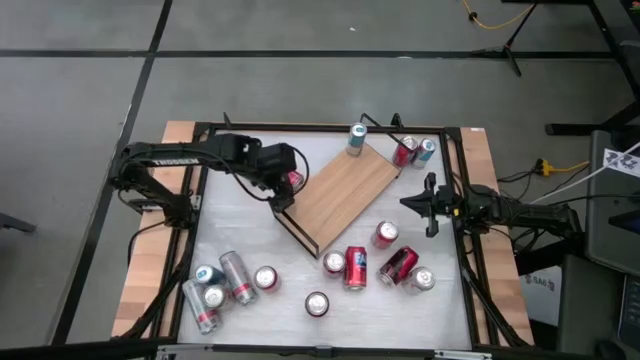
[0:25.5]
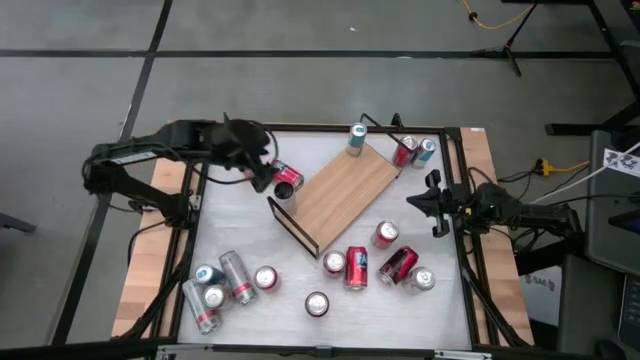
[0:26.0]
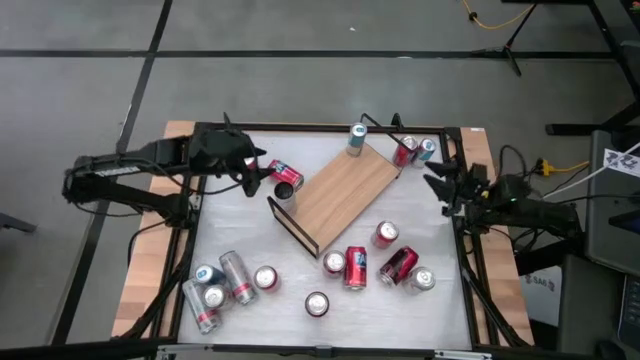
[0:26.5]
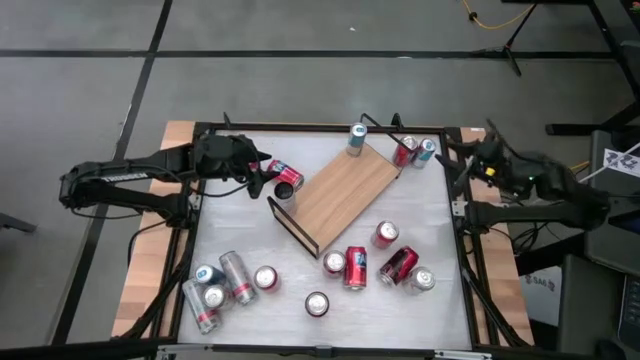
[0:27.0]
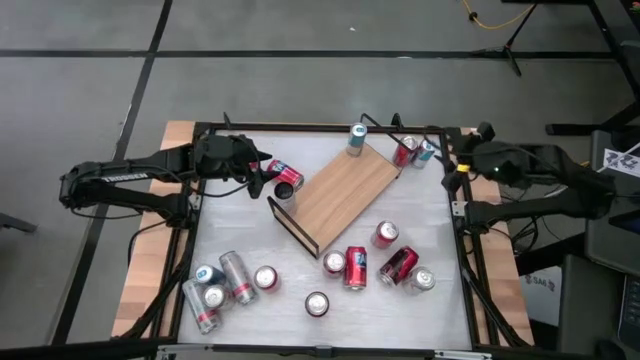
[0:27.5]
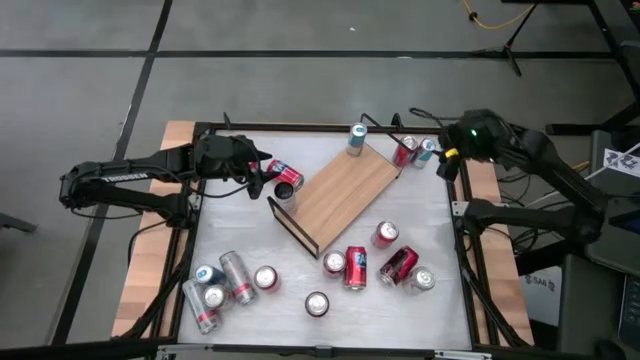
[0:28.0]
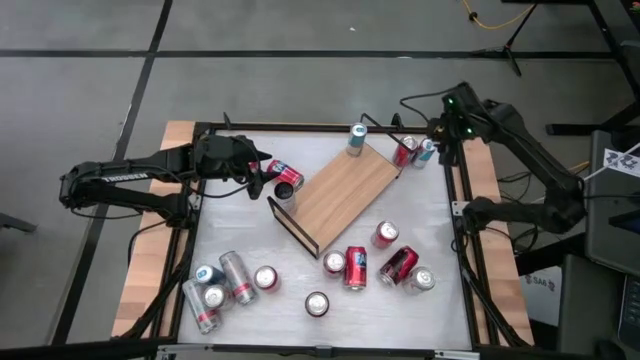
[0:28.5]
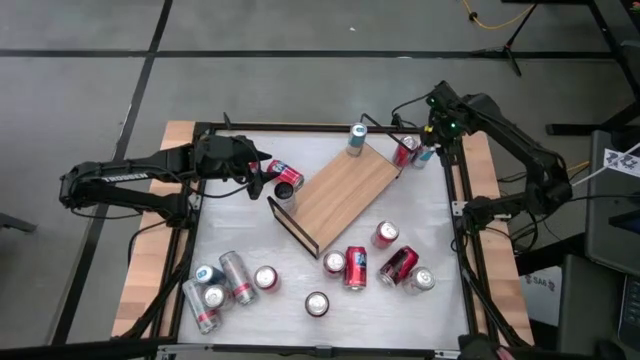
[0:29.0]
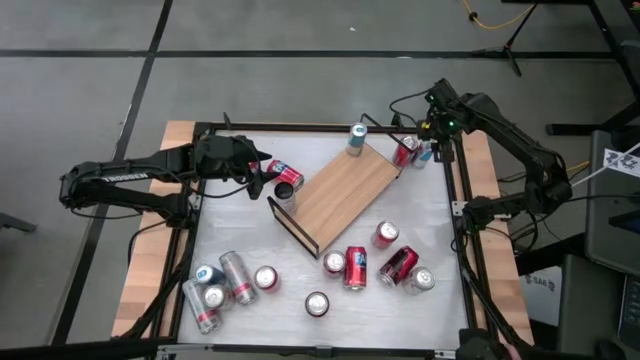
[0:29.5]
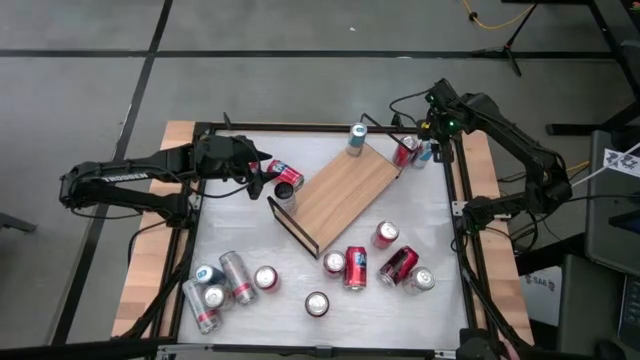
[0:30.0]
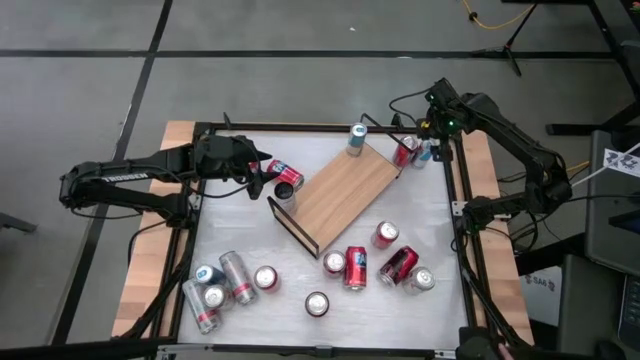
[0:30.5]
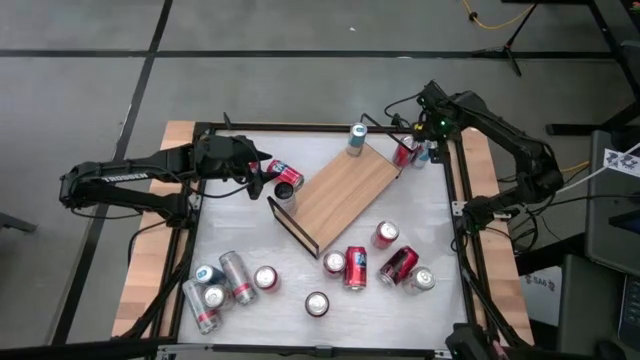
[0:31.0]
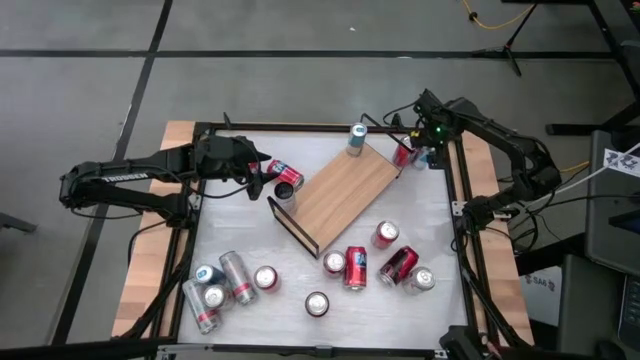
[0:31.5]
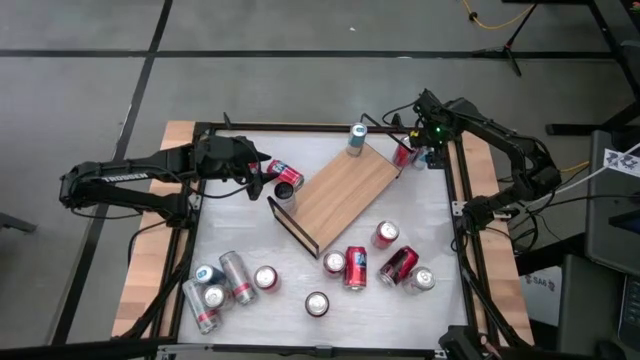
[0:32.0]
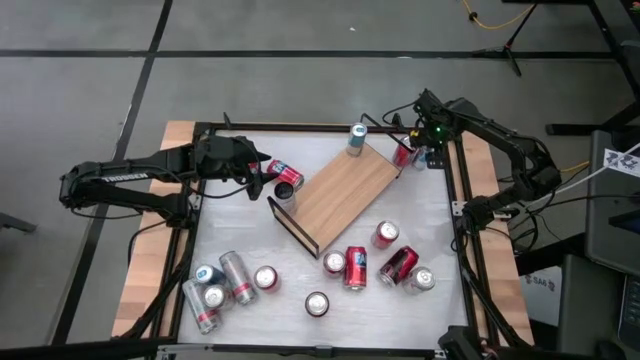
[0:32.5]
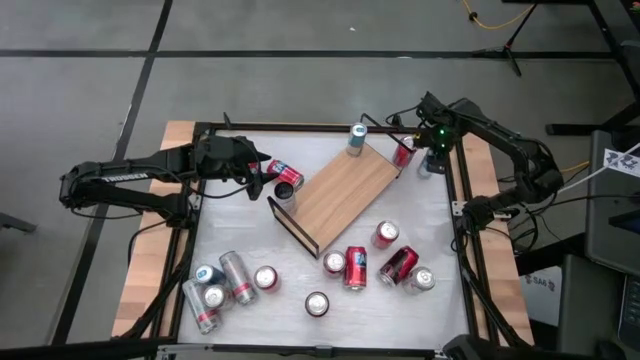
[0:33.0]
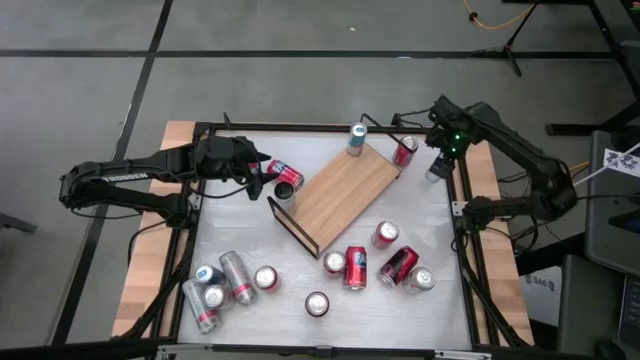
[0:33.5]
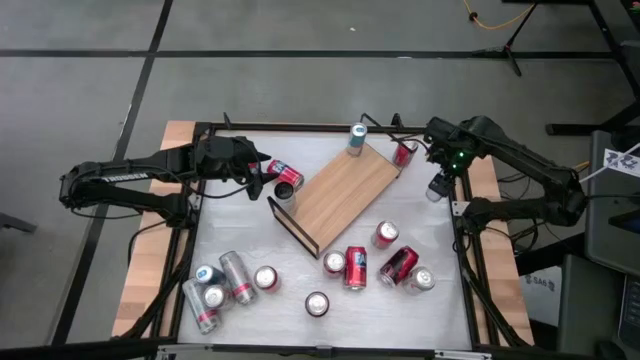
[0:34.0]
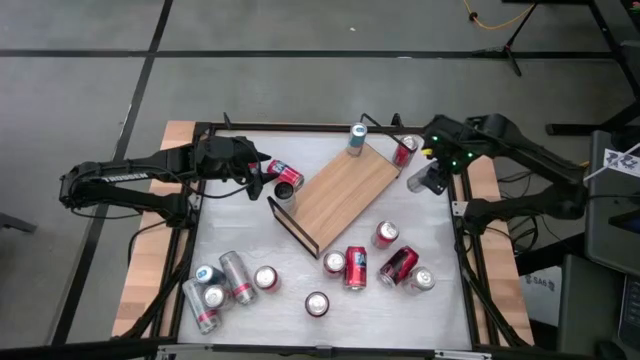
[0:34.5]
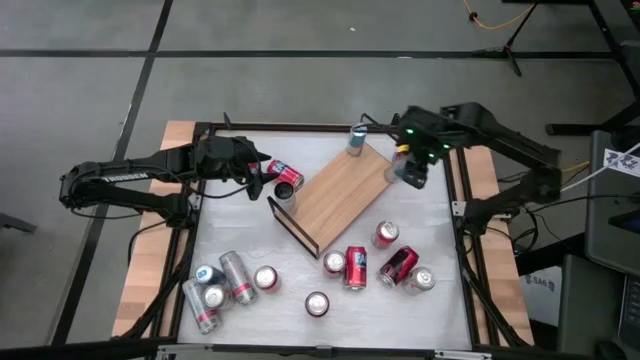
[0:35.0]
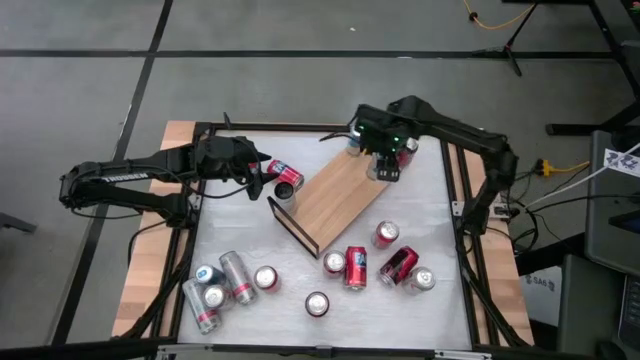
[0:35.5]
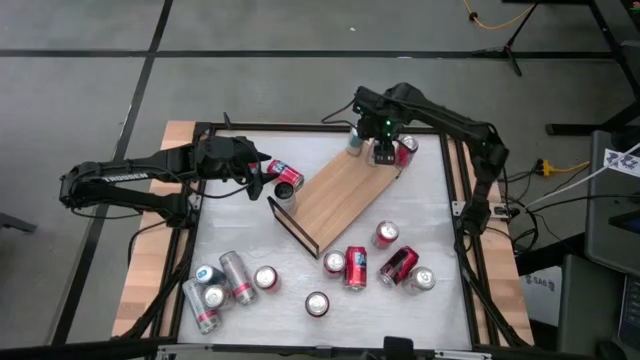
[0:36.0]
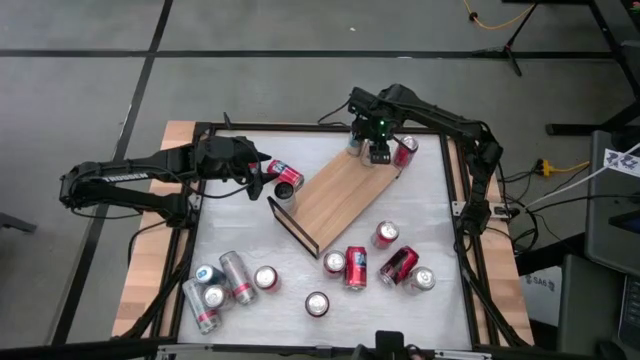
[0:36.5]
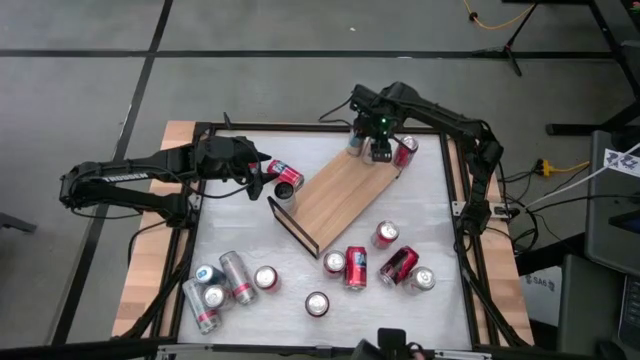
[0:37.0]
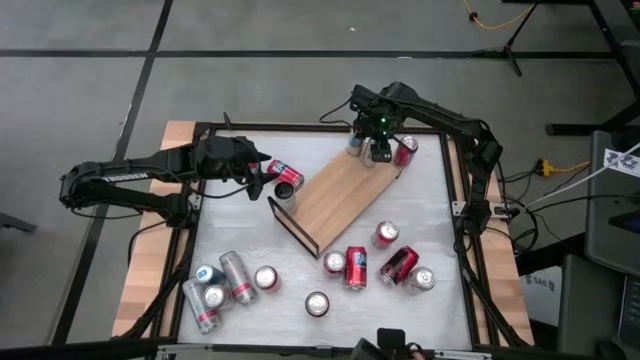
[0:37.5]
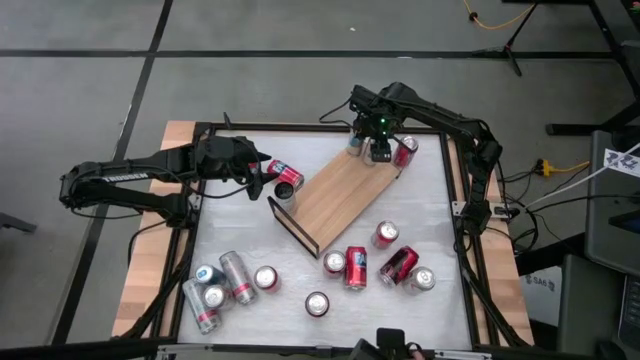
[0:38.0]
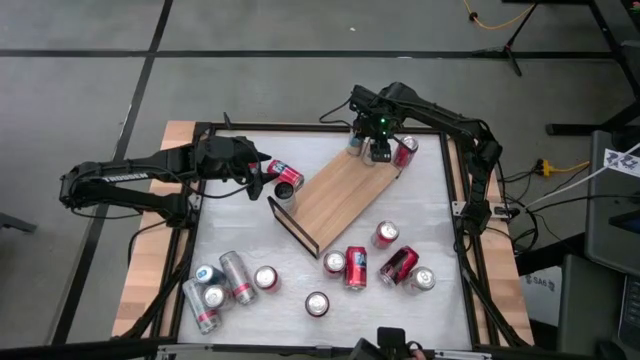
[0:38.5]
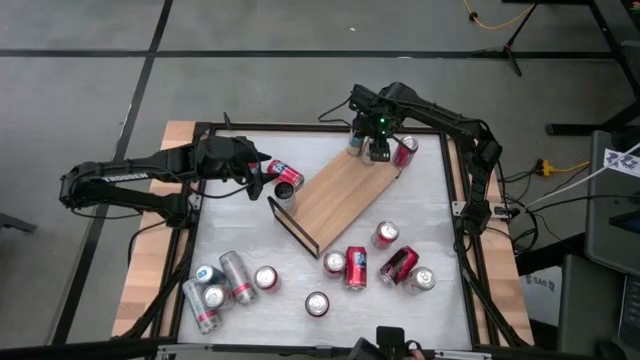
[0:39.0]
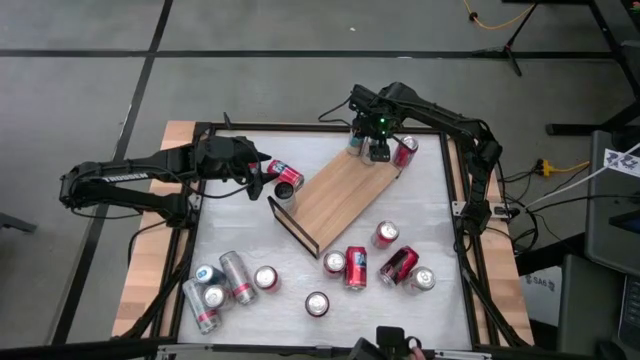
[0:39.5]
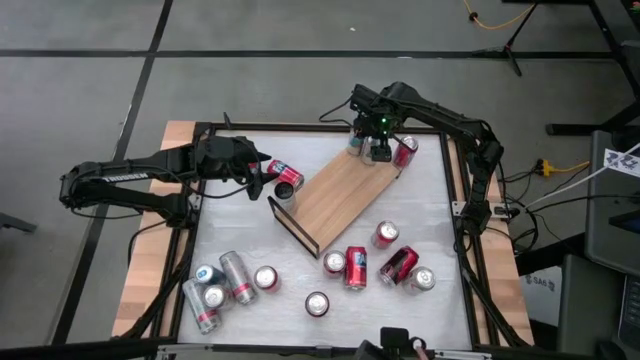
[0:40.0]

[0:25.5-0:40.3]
Task: Place canned beverage on shelf
Put the blue soda can on the shelf aligned with the other blue soda can

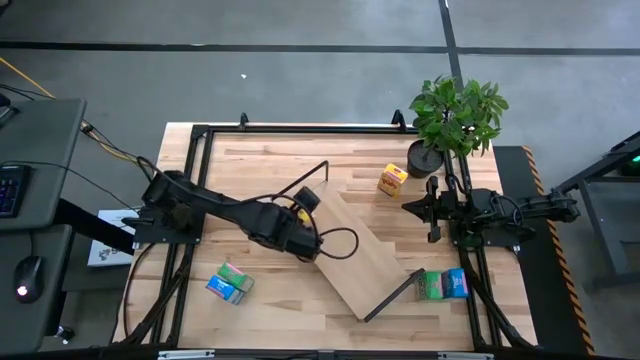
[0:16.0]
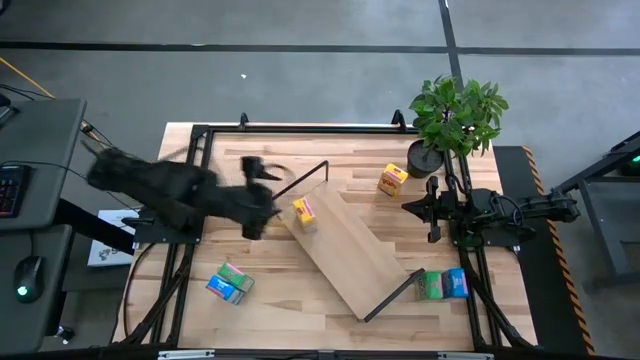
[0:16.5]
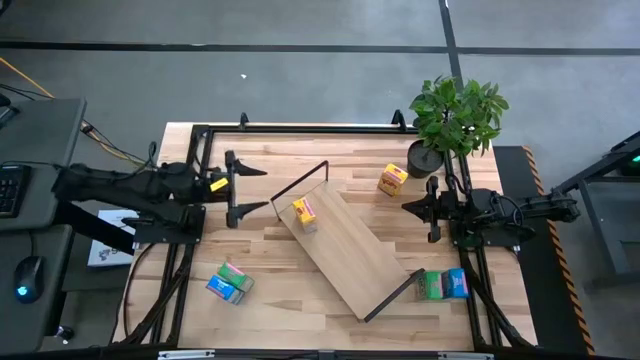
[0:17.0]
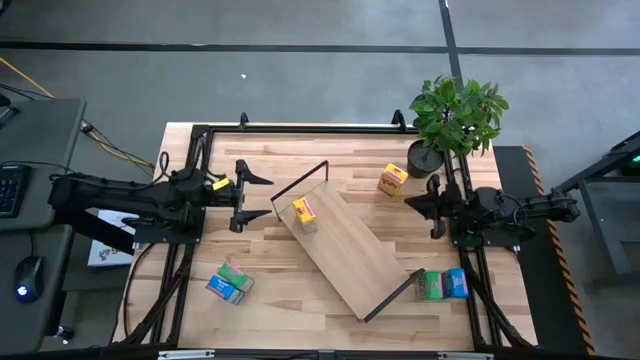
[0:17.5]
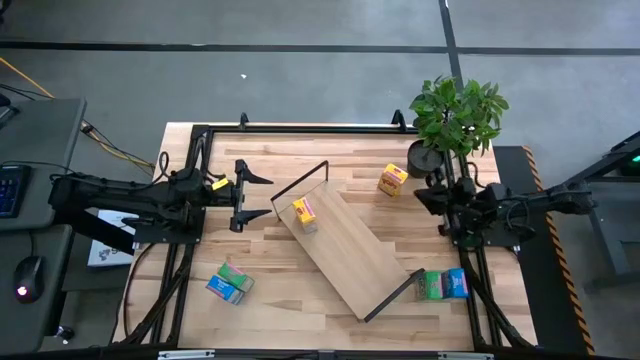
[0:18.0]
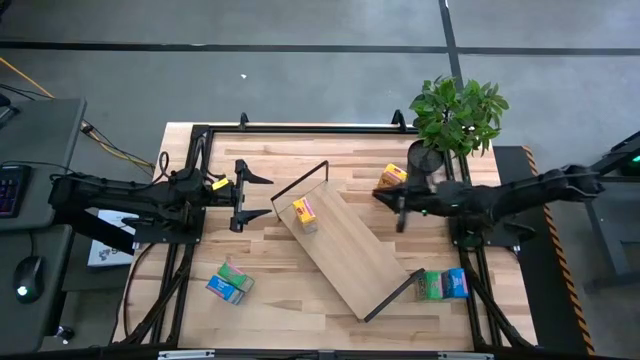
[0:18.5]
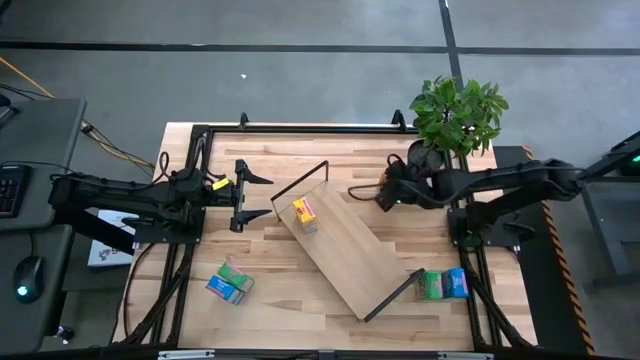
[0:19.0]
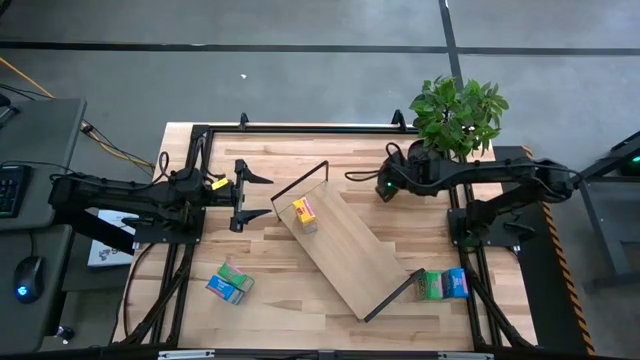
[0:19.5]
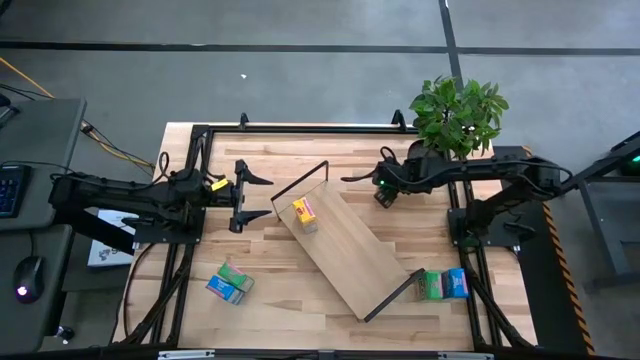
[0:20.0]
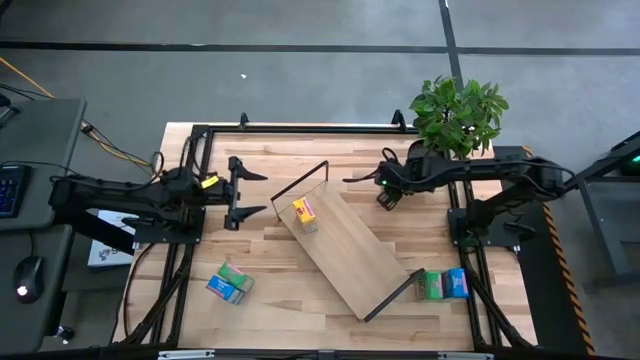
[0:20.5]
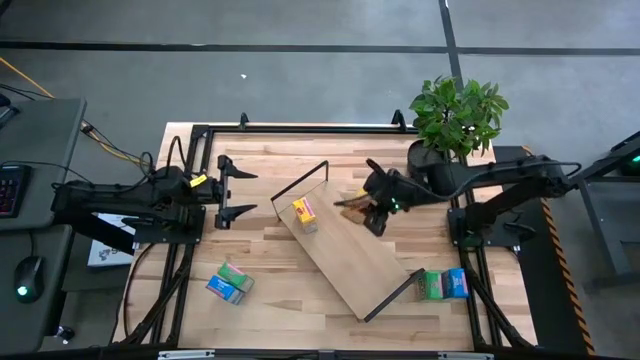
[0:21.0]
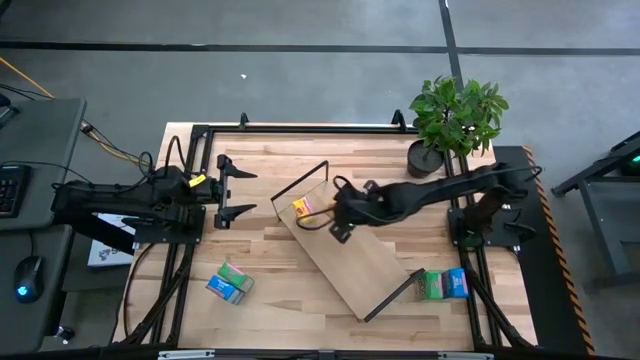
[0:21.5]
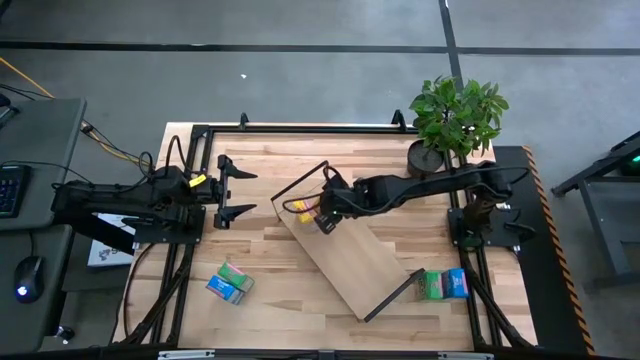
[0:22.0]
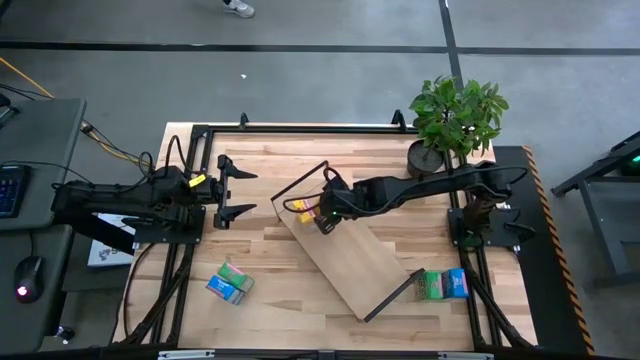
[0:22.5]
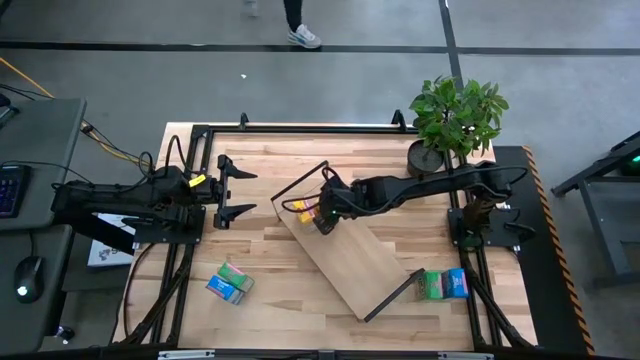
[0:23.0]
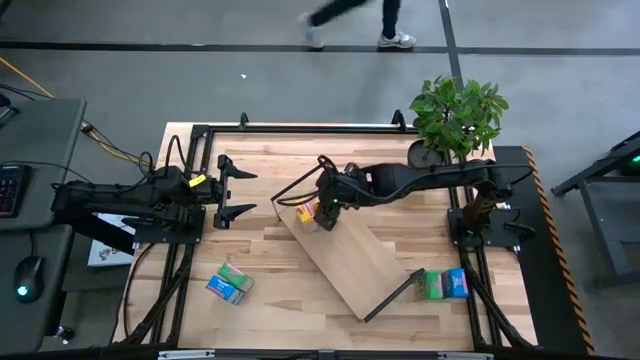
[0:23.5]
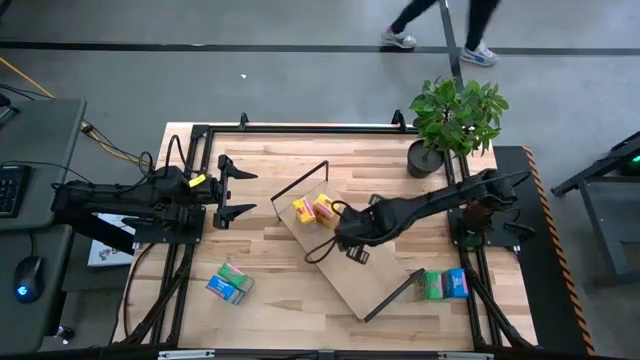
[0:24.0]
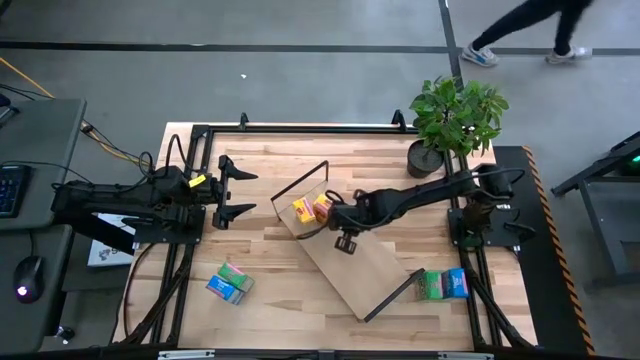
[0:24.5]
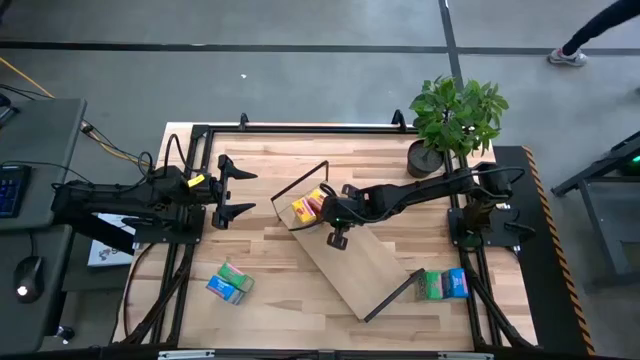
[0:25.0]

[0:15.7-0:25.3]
Task: Stack cereal on shelf
Put the yellow cereal box aligned with the other yellow cereal box on the shelf
